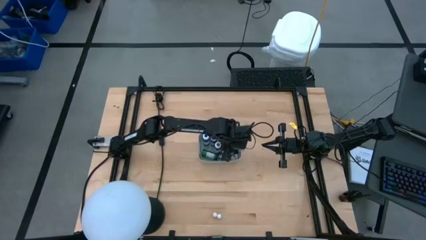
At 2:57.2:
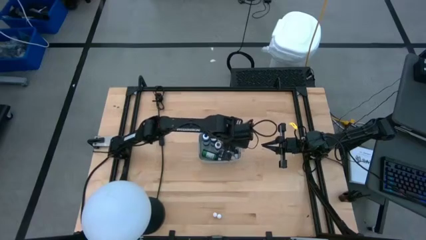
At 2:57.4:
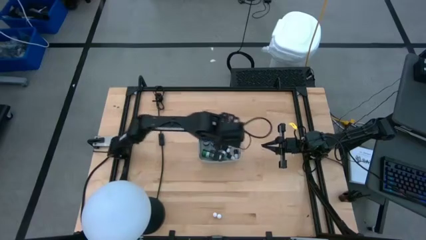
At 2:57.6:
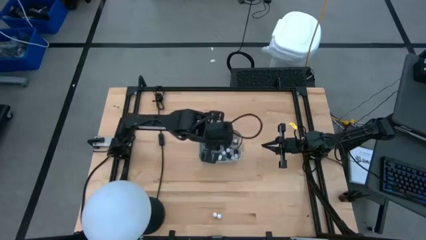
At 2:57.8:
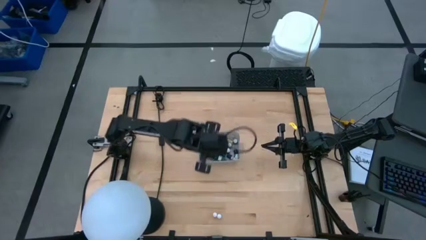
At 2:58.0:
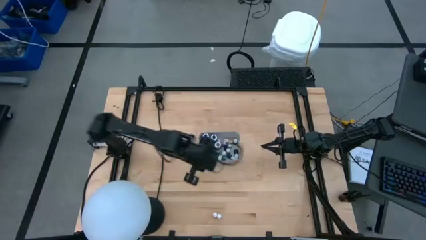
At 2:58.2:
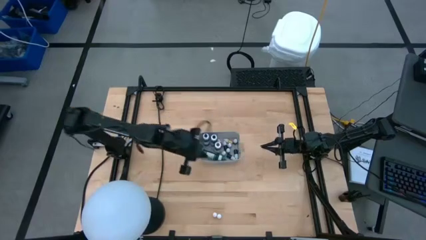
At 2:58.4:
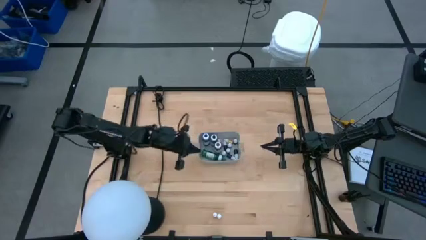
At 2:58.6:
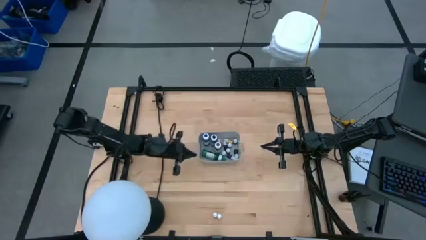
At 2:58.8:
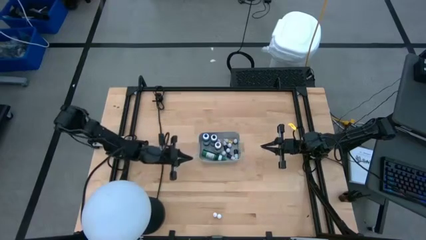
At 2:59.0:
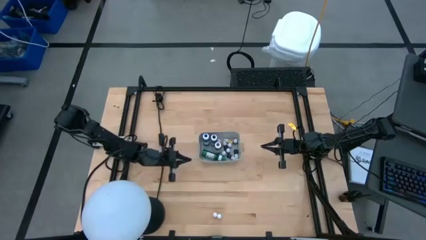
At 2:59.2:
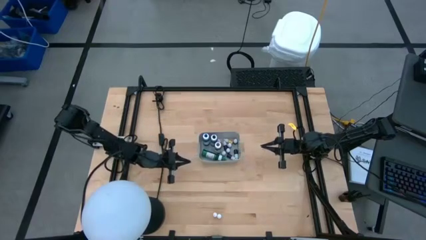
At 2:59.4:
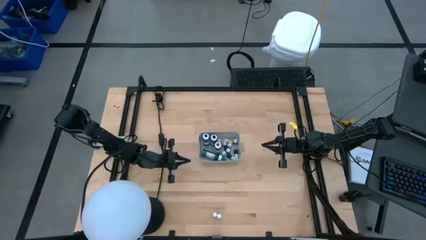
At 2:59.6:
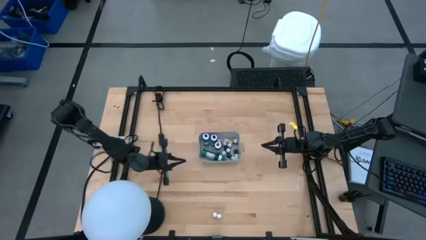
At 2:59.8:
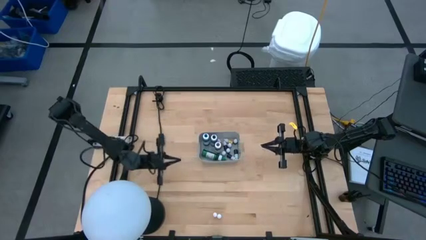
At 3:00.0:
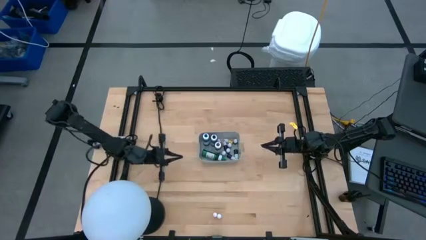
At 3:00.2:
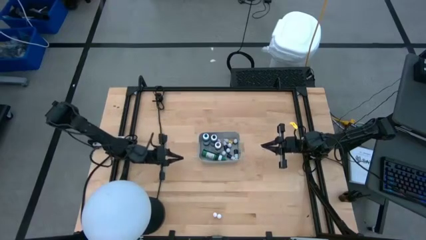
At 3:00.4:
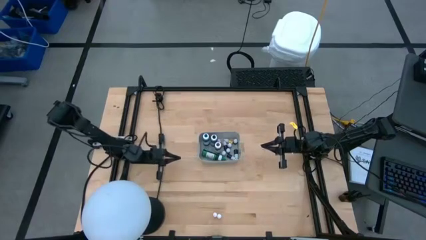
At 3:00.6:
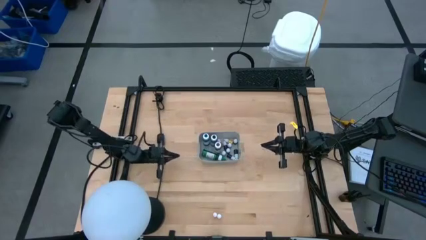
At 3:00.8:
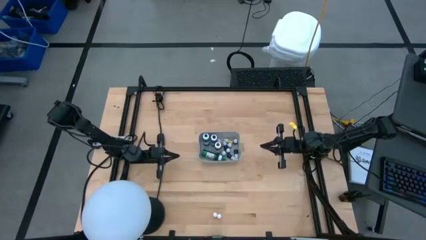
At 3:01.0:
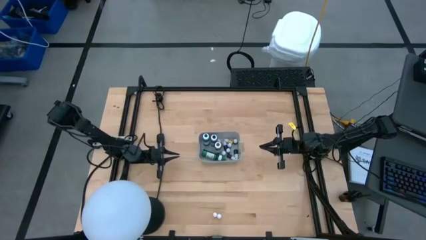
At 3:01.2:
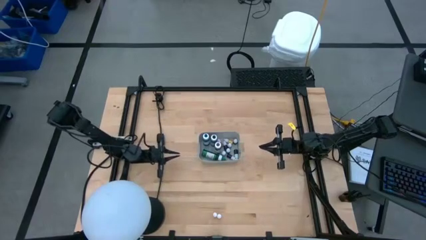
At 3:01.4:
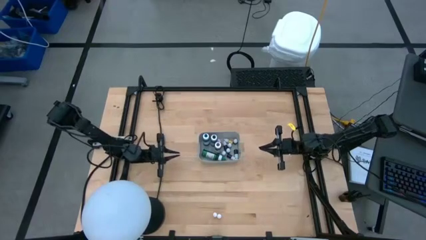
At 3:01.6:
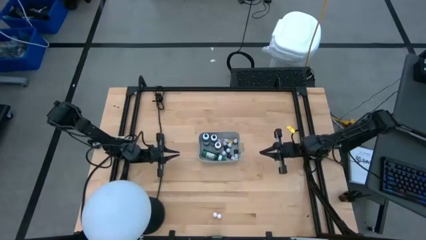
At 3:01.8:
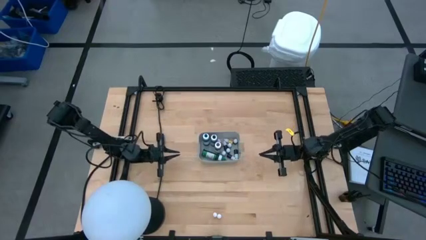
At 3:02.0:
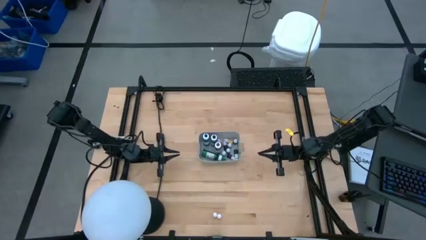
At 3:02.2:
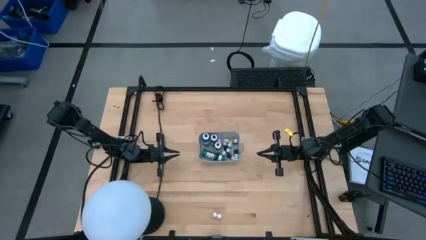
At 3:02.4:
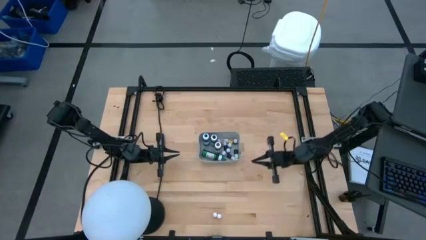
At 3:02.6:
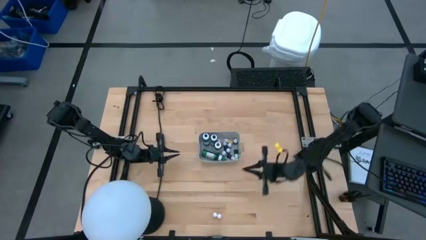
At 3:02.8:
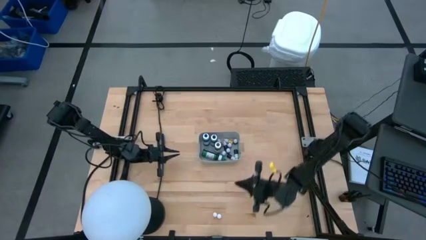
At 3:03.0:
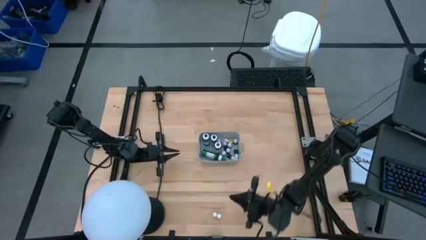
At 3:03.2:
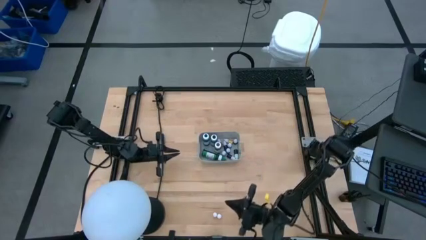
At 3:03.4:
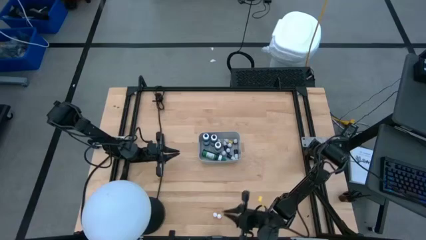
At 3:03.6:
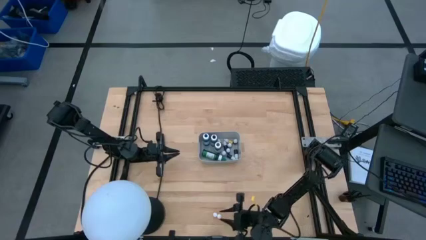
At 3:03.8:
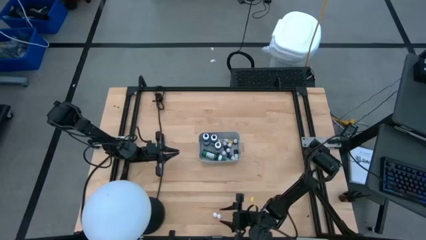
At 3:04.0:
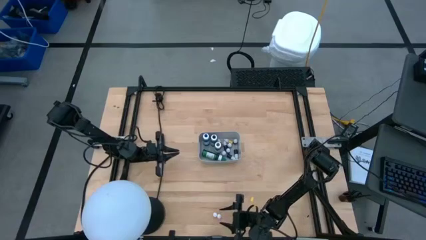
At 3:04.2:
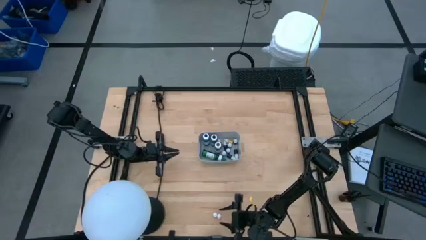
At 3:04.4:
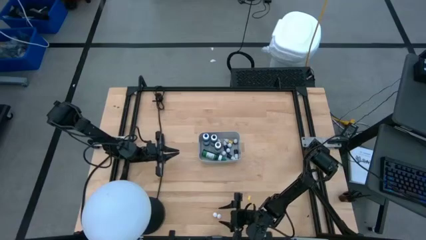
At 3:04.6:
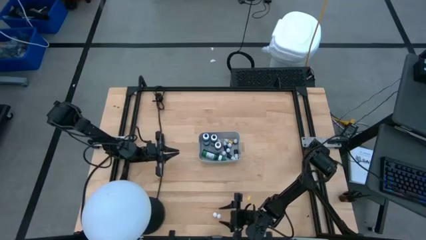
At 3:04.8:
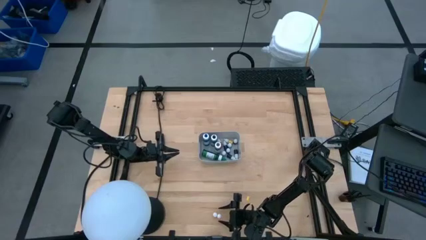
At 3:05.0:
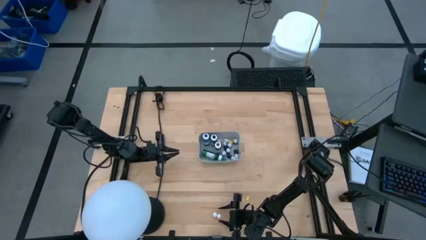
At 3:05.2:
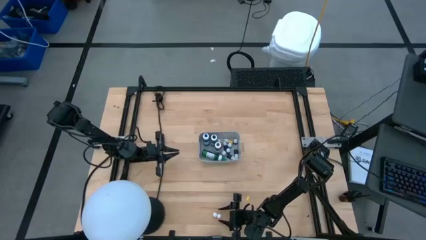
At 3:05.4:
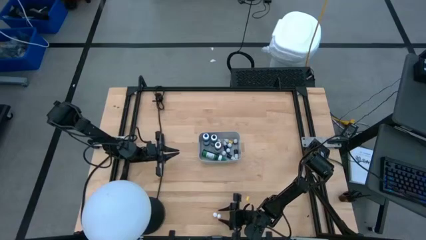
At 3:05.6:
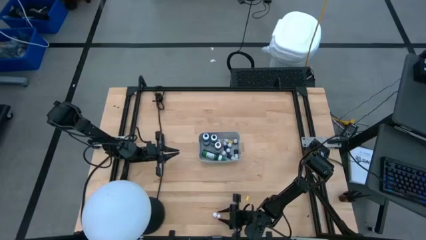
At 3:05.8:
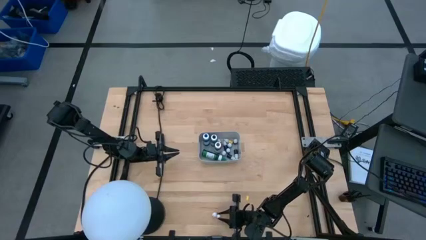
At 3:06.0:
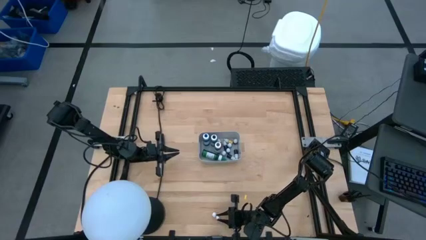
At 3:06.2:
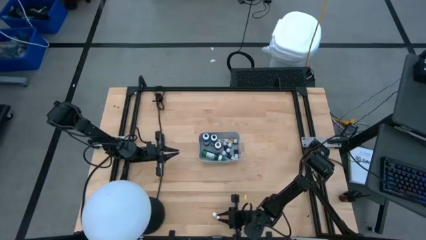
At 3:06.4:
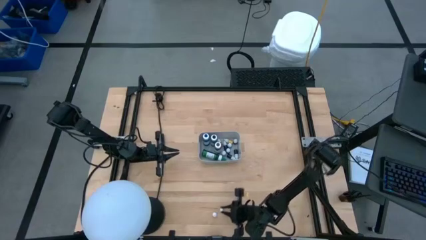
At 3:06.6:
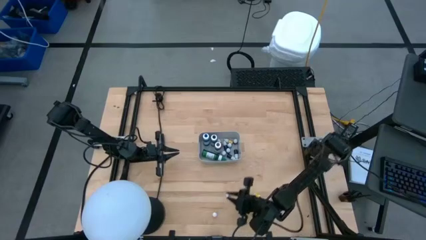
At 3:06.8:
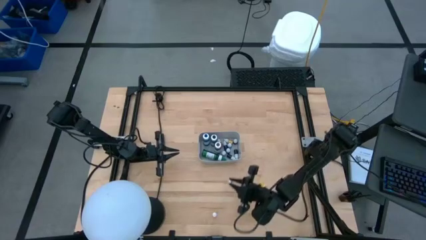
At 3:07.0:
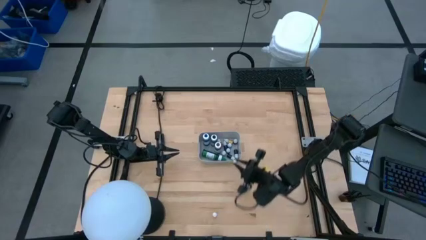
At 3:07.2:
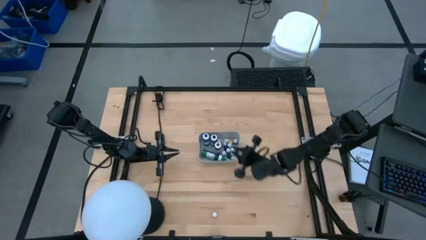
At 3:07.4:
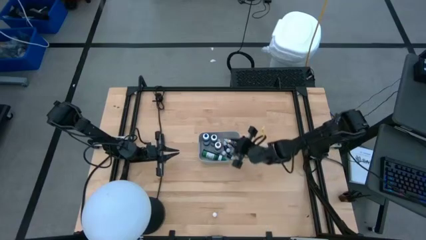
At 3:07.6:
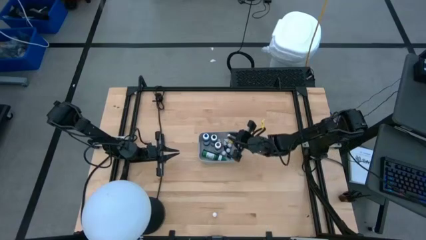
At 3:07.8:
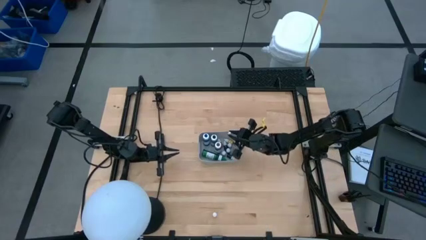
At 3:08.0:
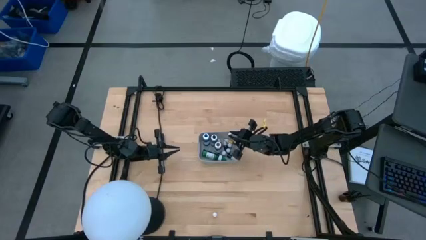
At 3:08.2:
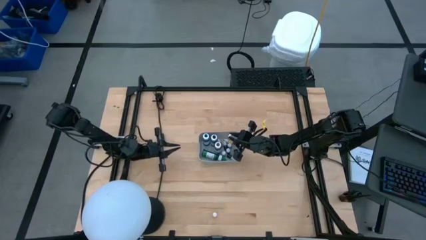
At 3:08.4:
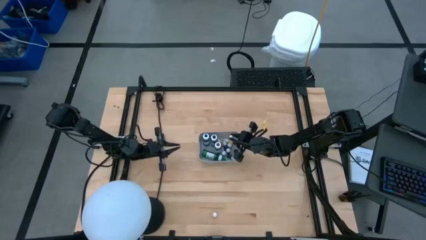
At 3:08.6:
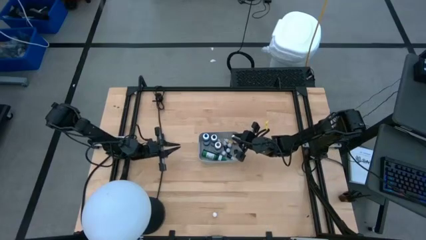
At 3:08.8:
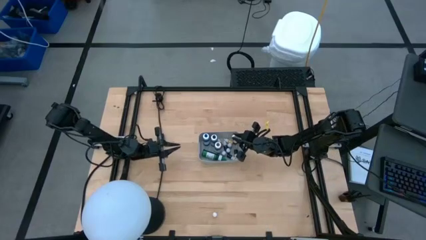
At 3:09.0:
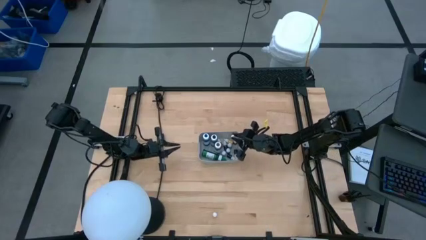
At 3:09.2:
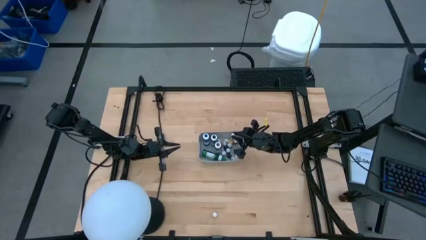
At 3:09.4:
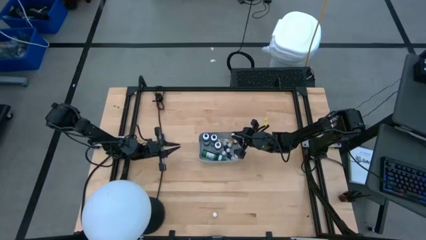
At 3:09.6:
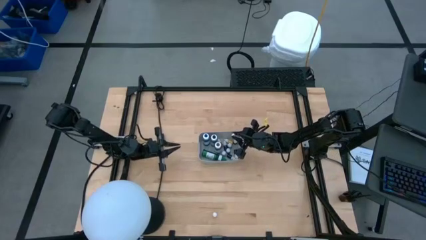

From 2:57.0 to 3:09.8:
Task: Pick & Place food coloring
Put the small orange food coloring bottle into the gray bin

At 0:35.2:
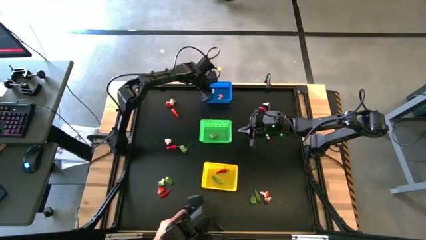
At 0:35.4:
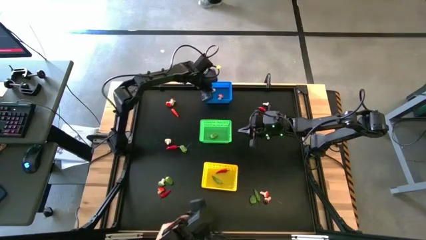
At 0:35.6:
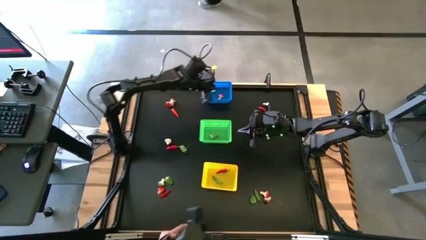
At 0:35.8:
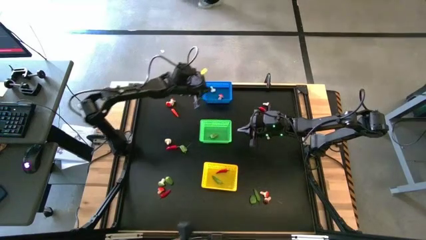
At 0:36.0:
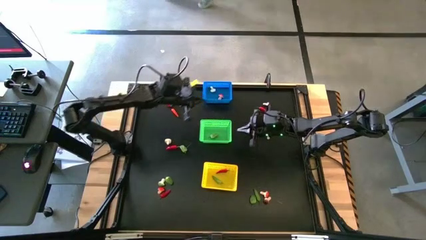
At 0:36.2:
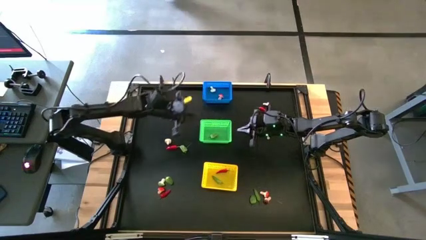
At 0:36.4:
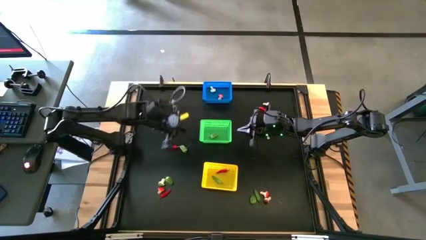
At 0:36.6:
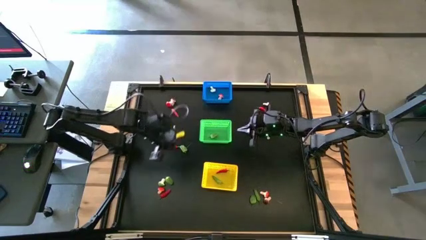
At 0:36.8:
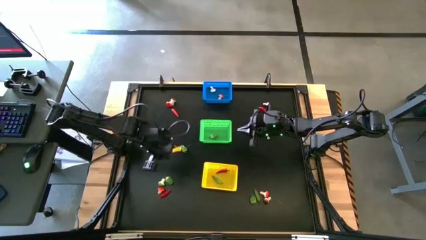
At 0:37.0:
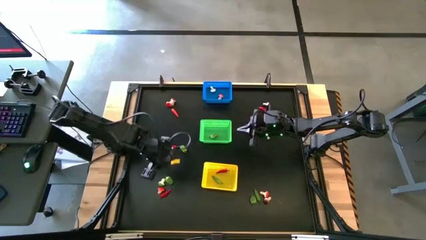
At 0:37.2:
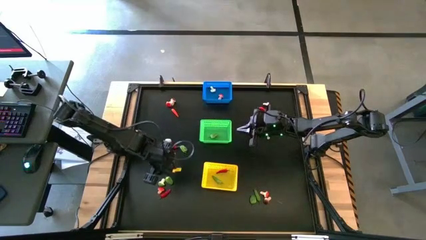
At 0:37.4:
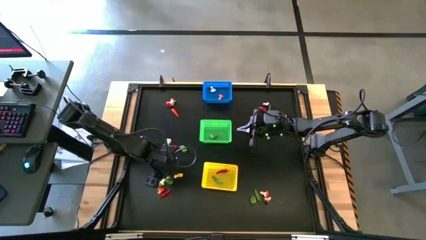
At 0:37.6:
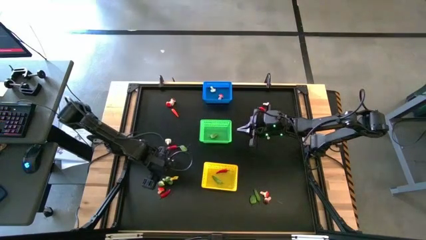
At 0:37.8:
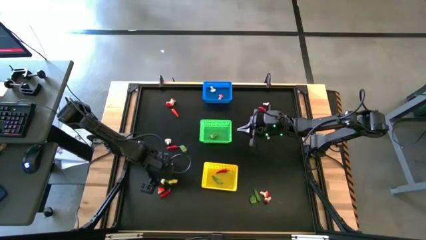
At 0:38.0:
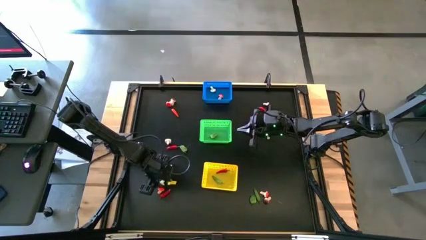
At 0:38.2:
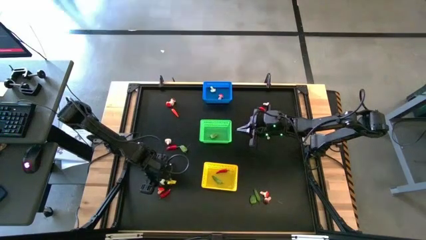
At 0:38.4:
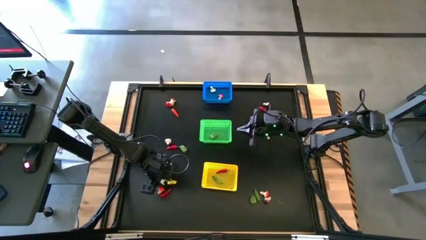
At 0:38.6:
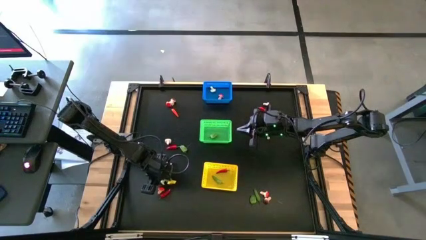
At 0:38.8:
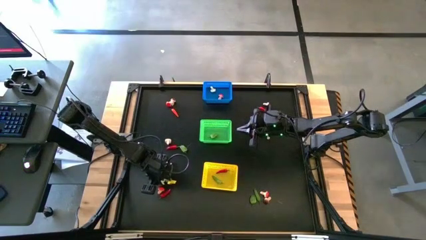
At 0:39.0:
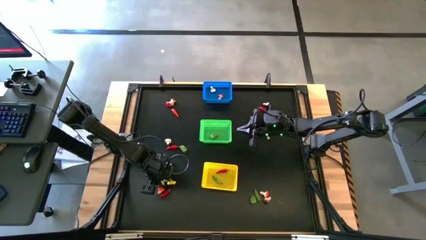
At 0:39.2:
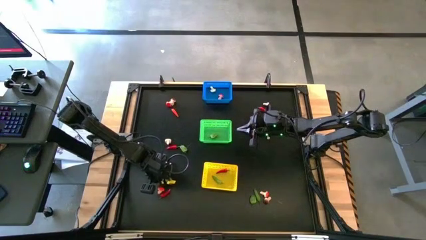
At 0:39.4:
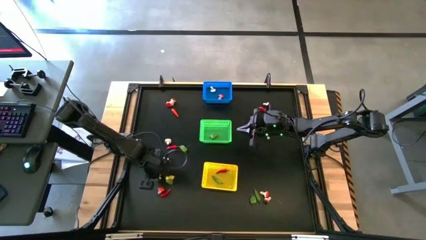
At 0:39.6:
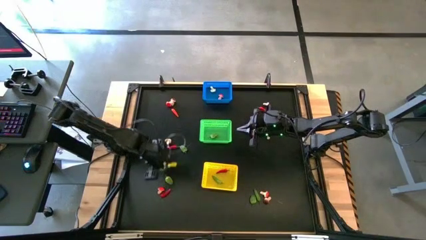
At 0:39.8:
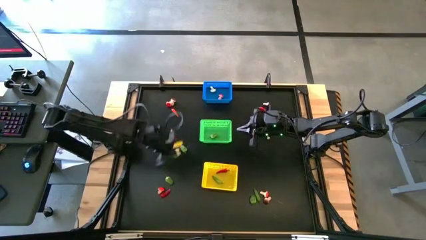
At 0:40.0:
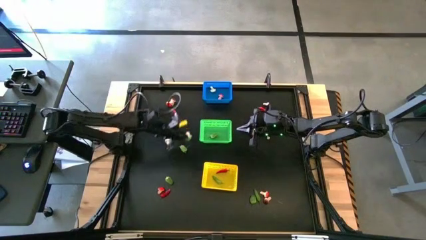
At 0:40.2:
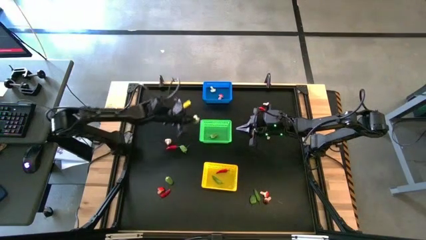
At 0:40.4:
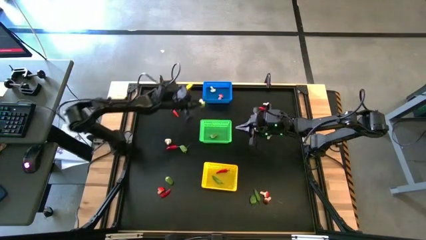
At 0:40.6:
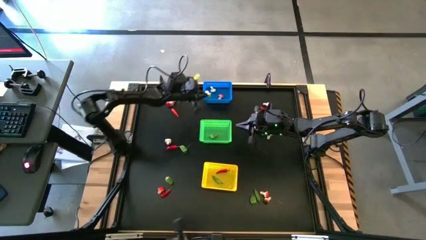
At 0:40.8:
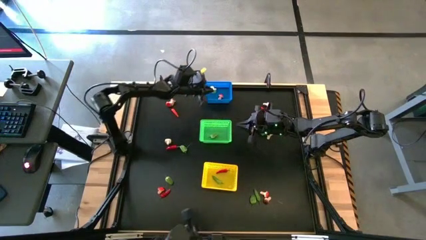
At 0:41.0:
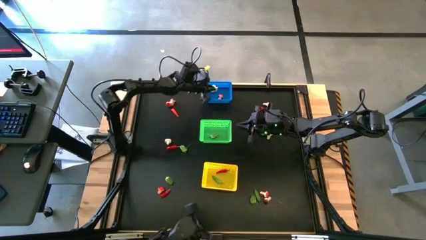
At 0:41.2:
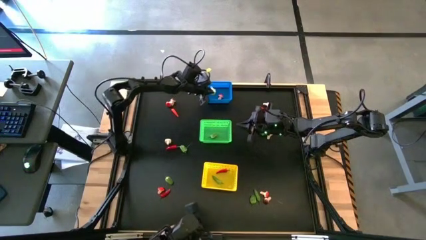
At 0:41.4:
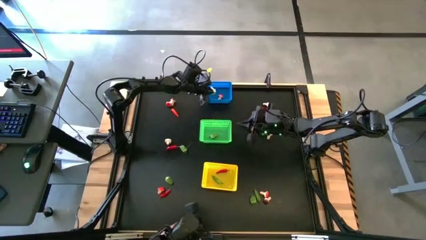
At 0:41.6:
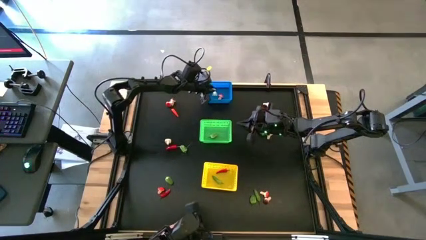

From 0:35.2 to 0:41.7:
Task: Sort produce into baskets
Put the green mushroom into the blue bin
